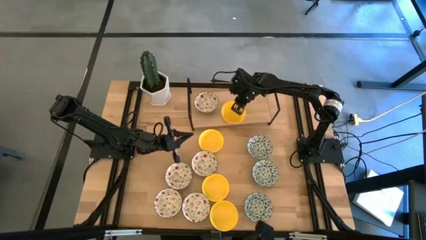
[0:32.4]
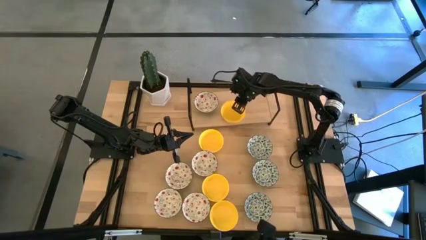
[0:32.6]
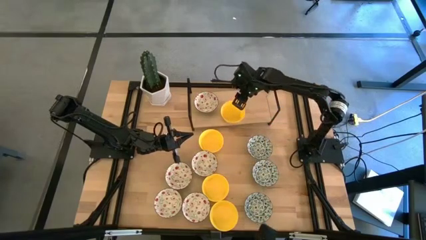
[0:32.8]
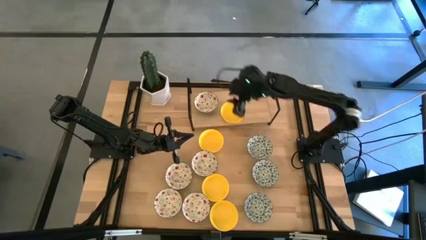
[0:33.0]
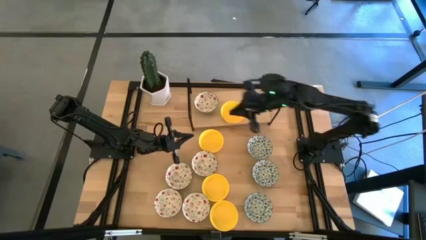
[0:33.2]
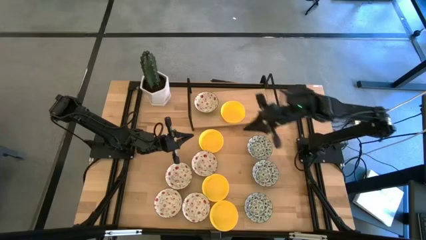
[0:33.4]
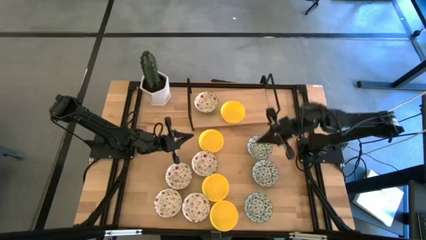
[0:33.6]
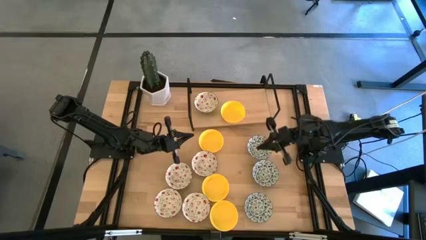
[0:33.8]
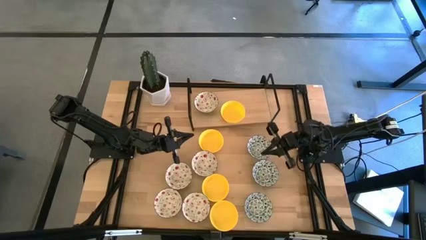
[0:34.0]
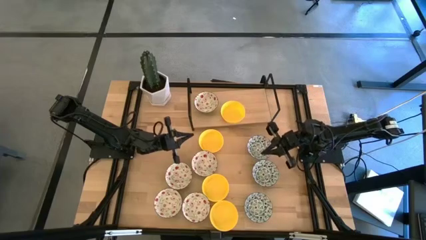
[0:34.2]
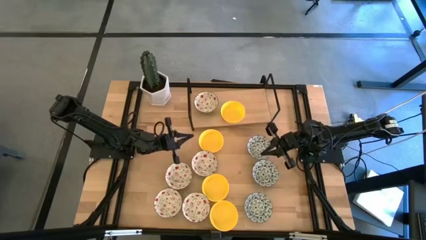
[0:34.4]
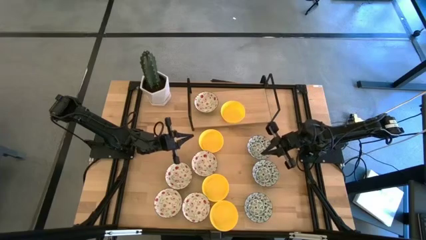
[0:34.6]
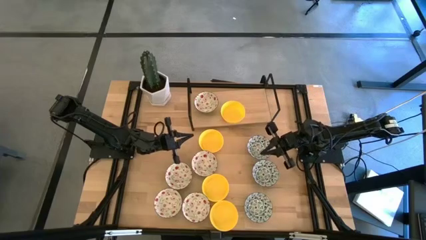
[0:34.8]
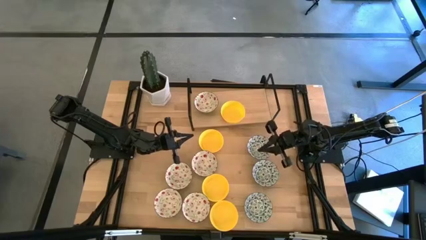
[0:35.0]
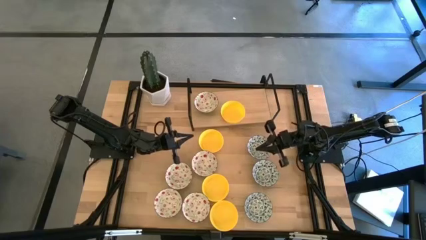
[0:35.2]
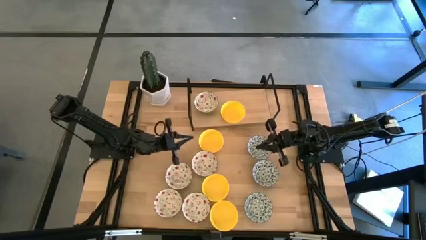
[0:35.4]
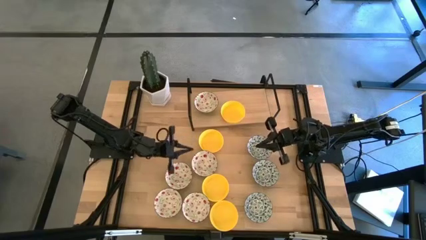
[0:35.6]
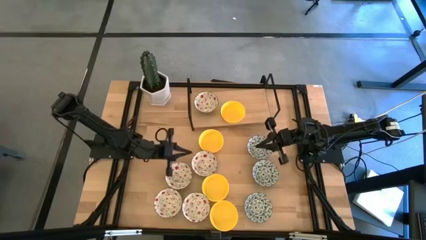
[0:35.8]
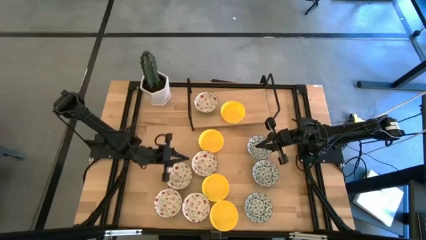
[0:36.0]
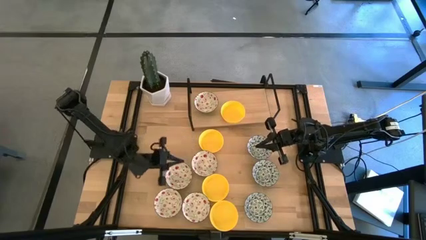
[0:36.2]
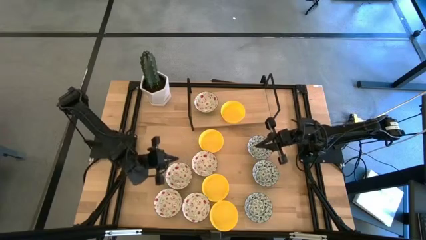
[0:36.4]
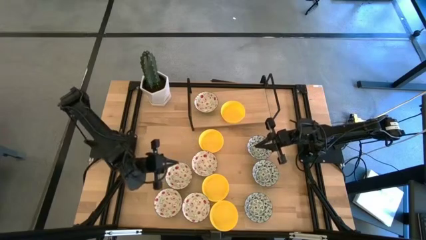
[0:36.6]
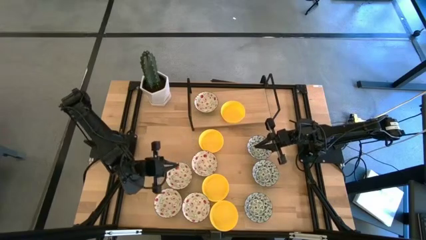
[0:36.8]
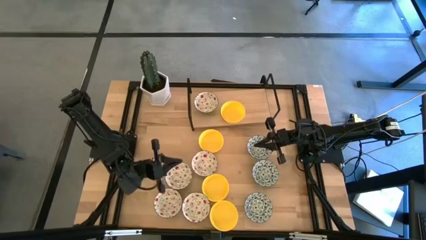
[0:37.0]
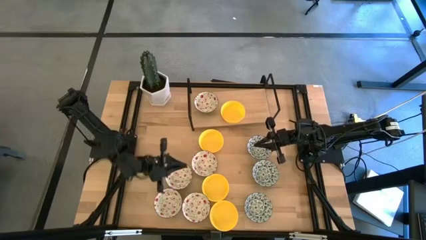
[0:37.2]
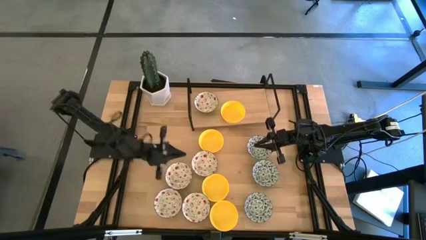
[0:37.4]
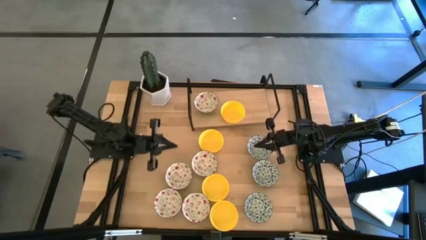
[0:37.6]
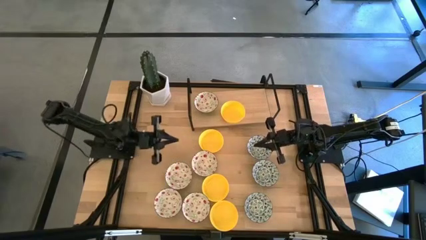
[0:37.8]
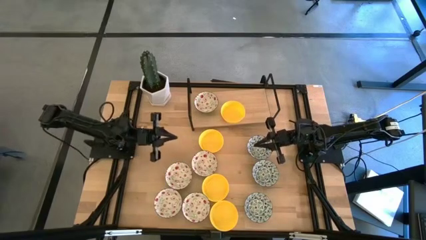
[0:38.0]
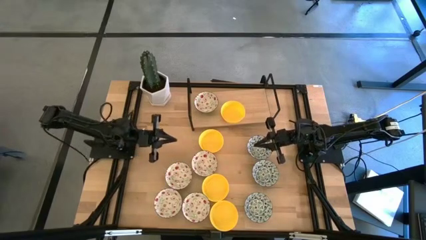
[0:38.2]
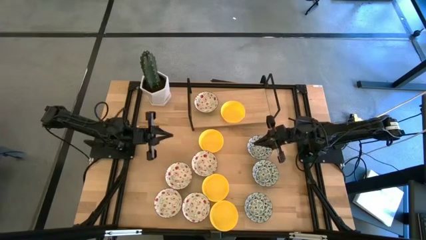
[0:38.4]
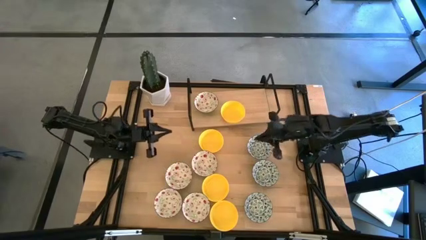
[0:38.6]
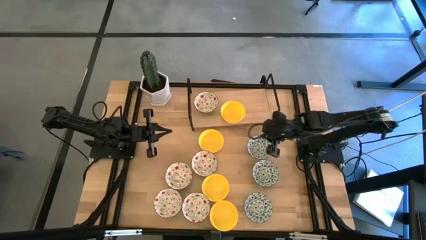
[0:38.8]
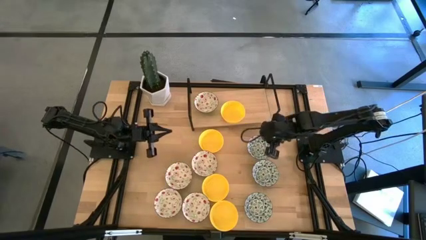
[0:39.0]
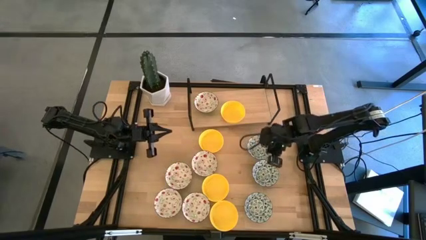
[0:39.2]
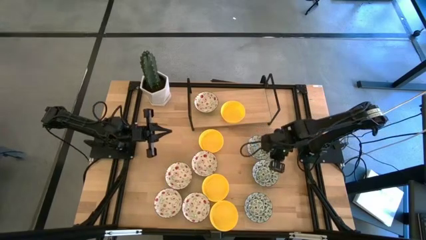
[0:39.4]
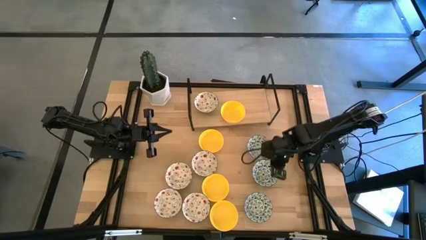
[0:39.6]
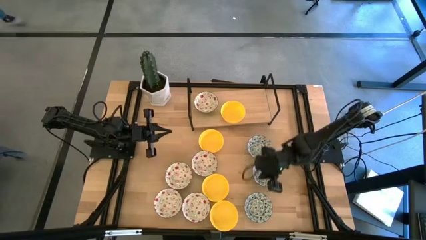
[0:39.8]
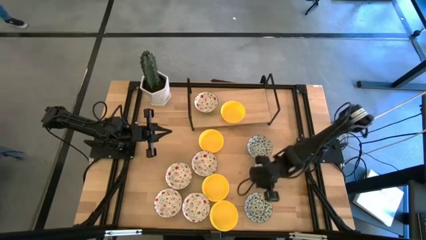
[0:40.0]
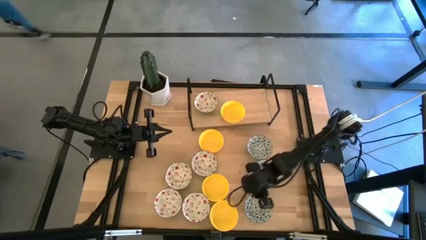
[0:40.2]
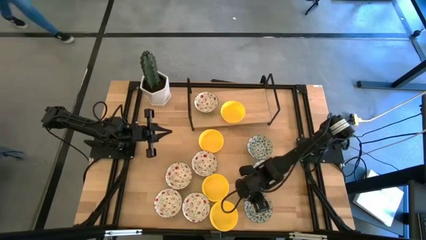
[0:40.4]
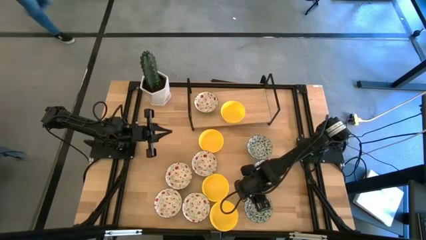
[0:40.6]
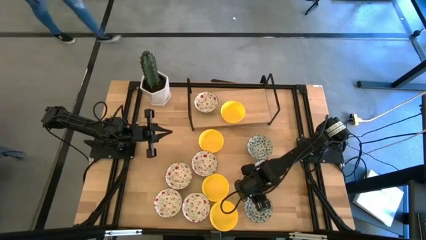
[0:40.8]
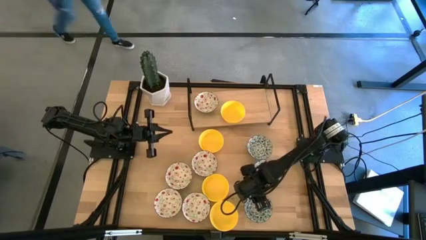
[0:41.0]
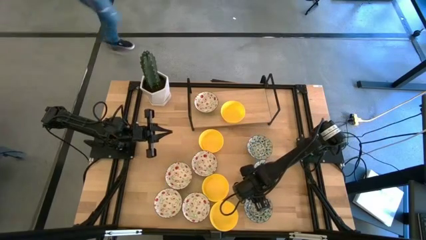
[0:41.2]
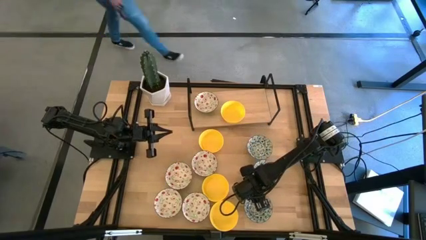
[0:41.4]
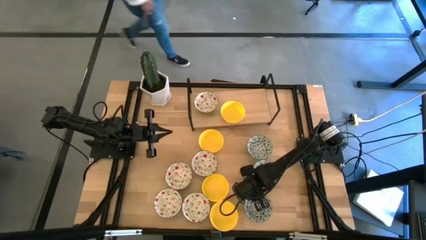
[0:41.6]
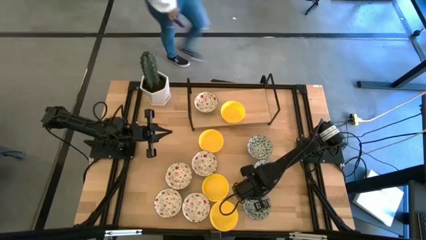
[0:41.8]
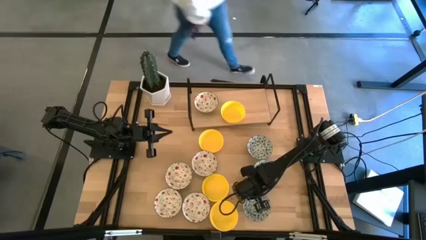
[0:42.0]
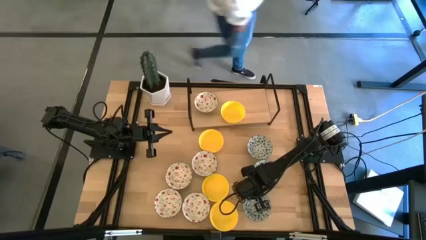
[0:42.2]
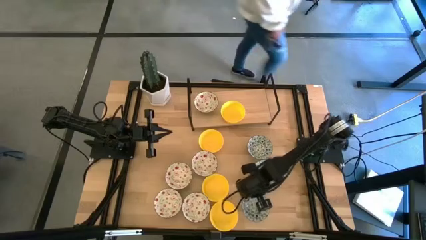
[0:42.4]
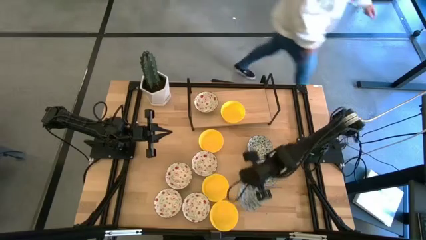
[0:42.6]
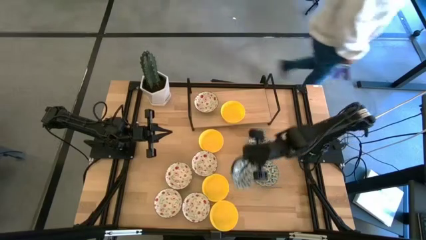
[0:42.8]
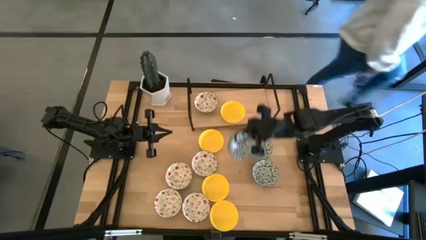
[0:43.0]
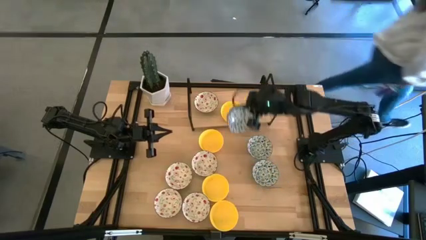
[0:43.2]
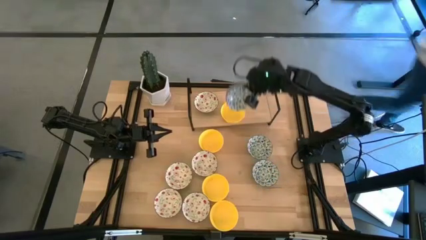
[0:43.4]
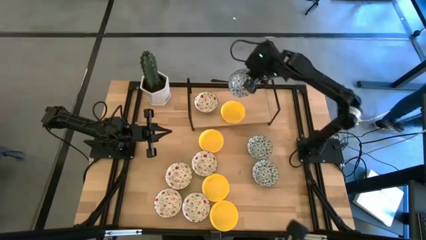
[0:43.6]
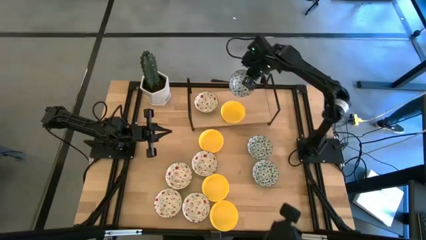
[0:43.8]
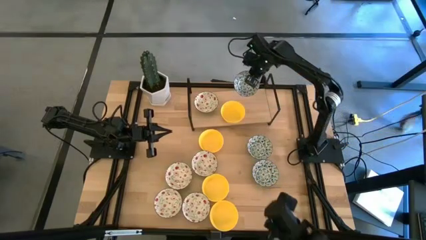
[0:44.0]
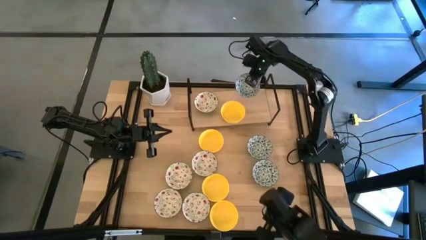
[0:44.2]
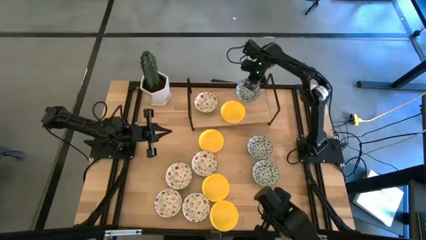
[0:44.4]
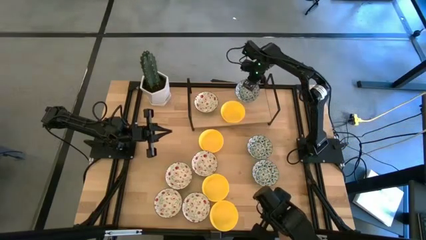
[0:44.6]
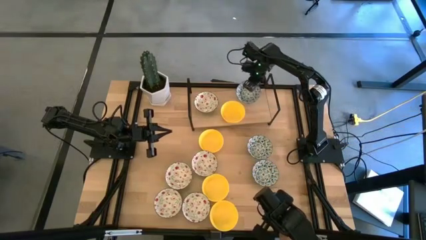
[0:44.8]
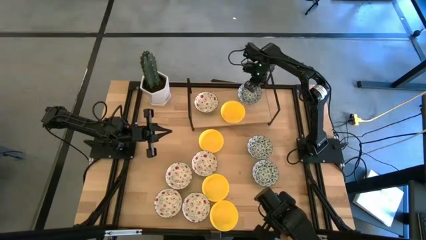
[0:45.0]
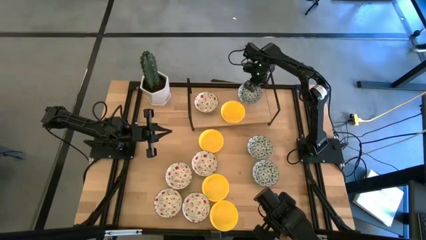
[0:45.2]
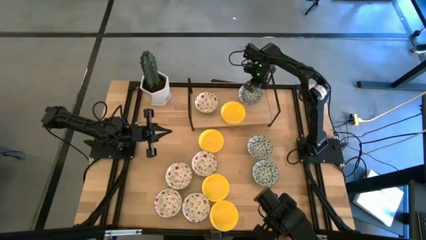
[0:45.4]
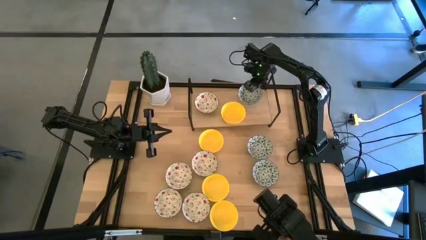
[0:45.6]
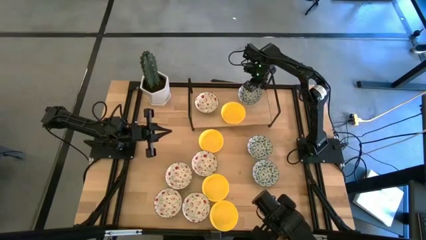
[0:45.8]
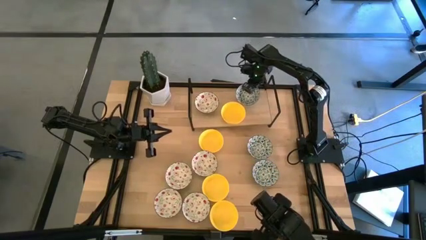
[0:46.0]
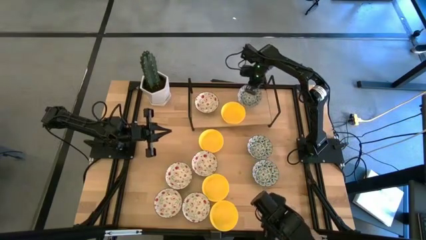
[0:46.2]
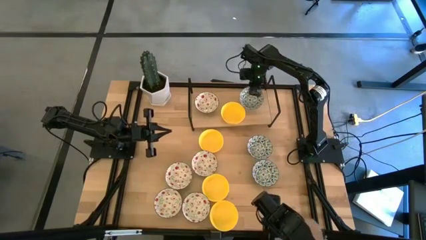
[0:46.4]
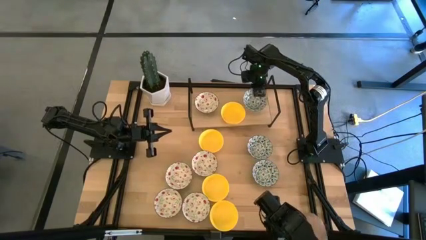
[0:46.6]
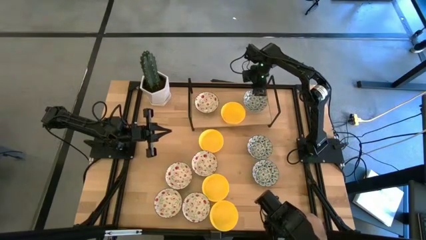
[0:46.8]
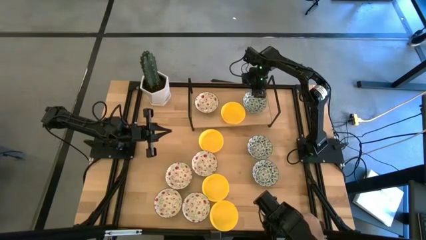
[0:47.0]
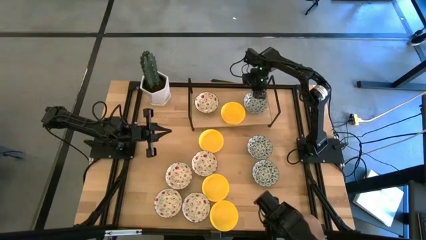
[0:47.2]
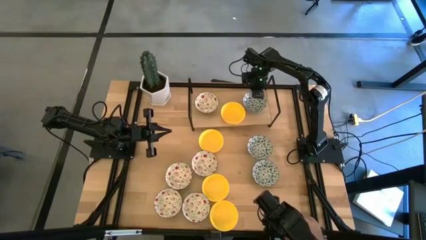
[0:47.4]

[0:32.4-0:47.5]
Task: Pick & Place Mini bowls
Put the blue patterned bowl on the shelf
